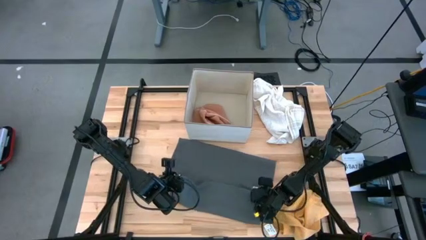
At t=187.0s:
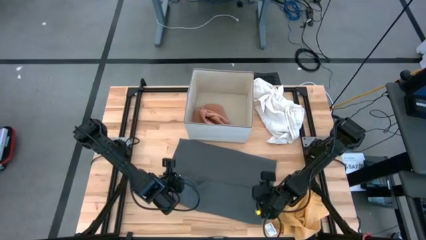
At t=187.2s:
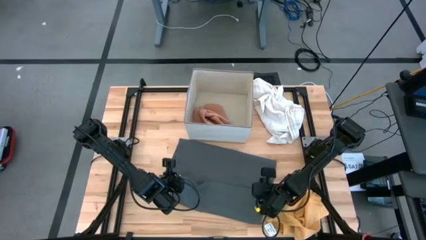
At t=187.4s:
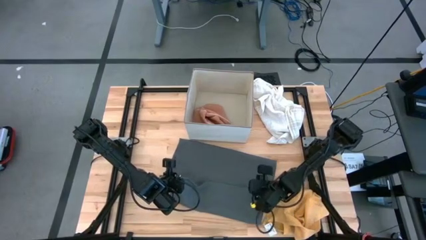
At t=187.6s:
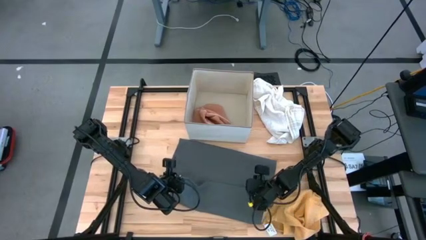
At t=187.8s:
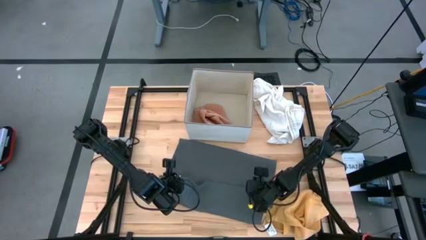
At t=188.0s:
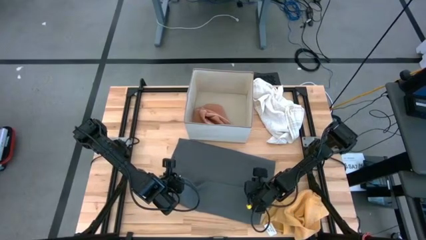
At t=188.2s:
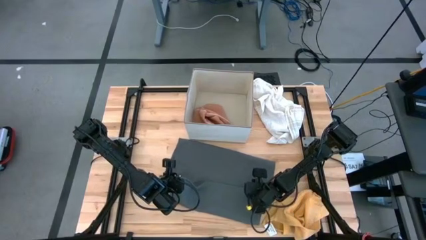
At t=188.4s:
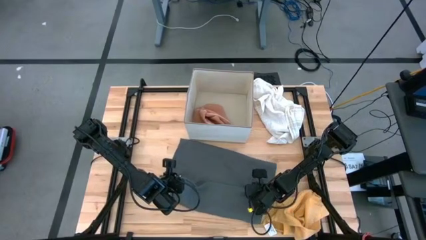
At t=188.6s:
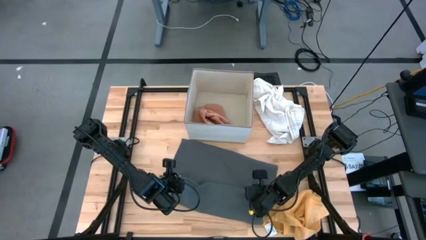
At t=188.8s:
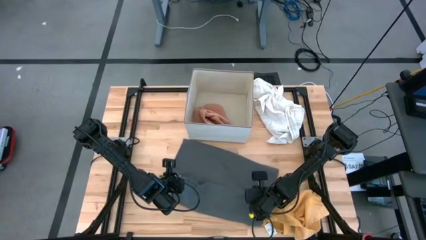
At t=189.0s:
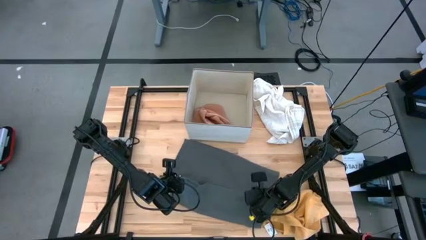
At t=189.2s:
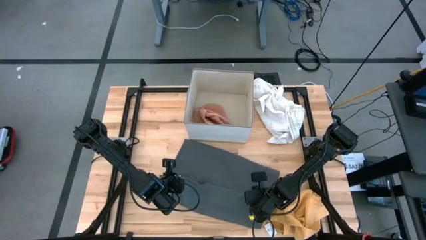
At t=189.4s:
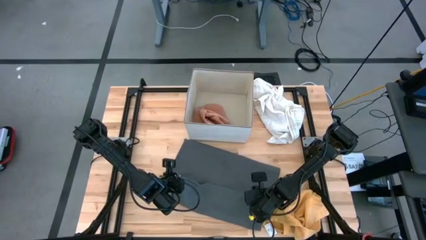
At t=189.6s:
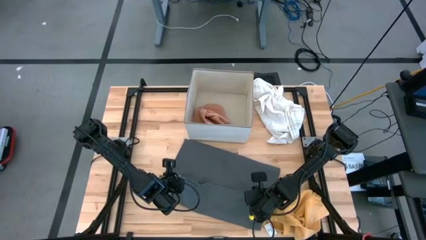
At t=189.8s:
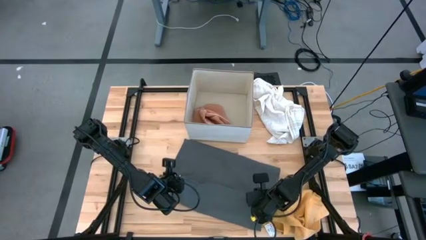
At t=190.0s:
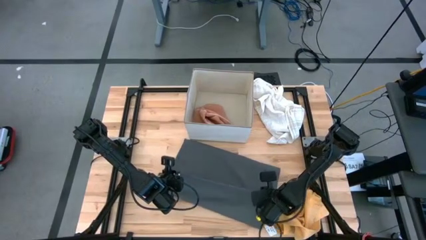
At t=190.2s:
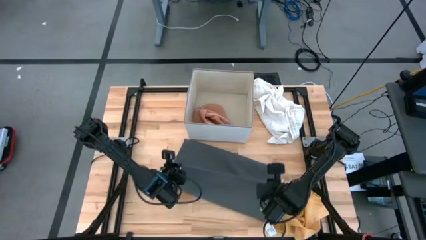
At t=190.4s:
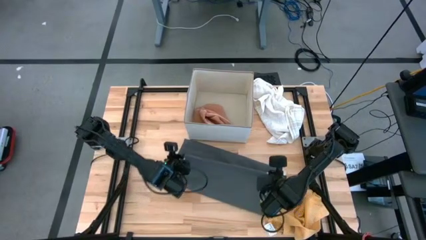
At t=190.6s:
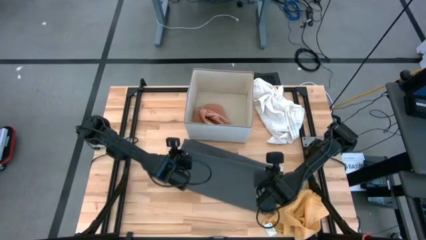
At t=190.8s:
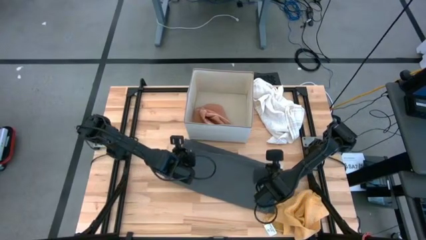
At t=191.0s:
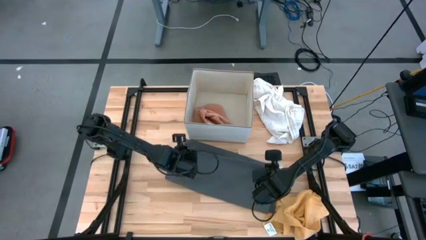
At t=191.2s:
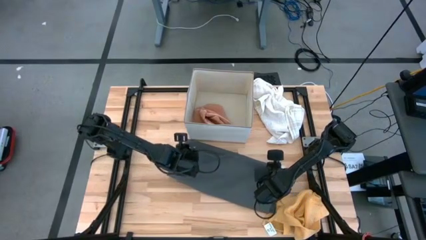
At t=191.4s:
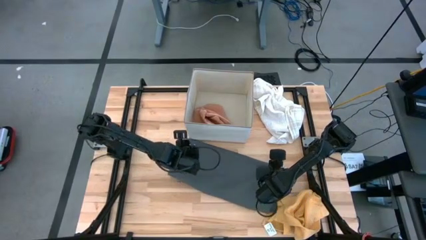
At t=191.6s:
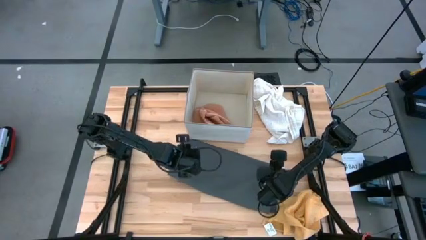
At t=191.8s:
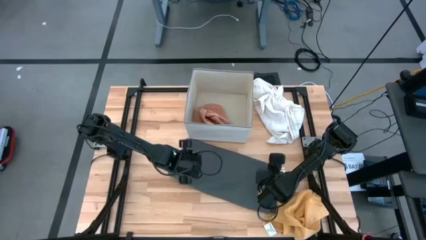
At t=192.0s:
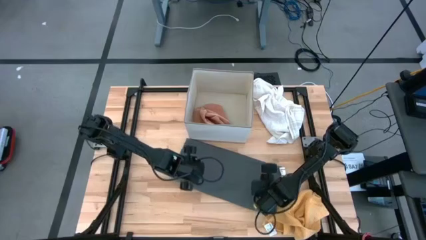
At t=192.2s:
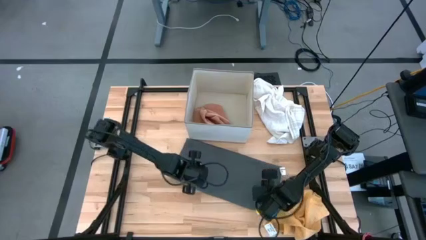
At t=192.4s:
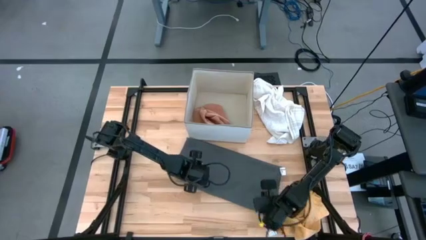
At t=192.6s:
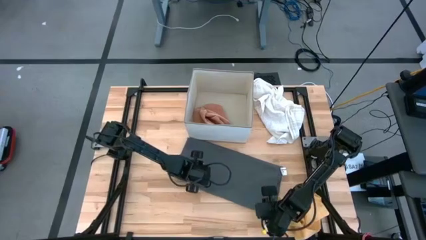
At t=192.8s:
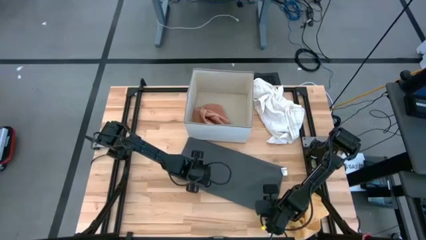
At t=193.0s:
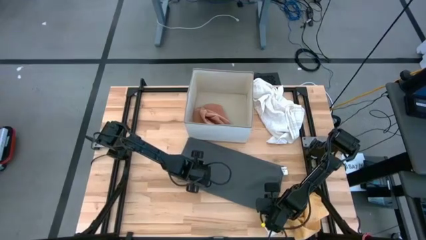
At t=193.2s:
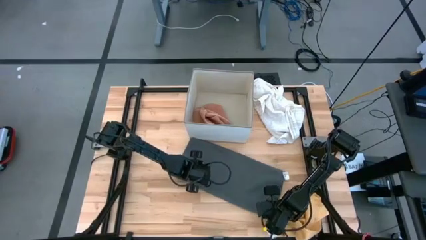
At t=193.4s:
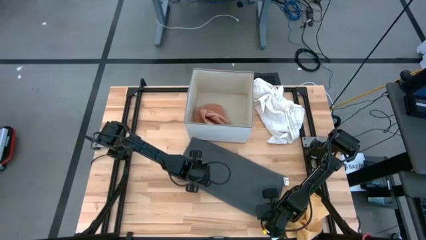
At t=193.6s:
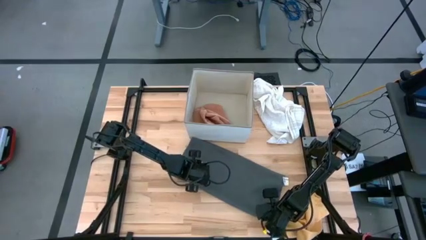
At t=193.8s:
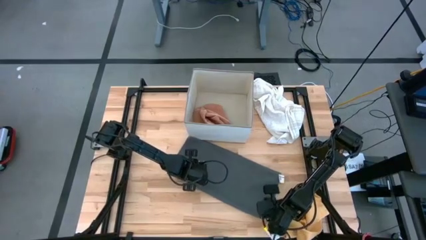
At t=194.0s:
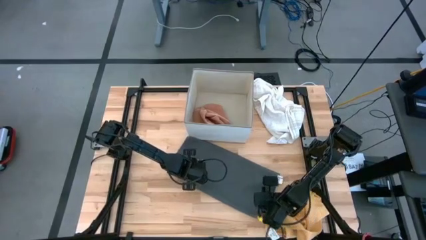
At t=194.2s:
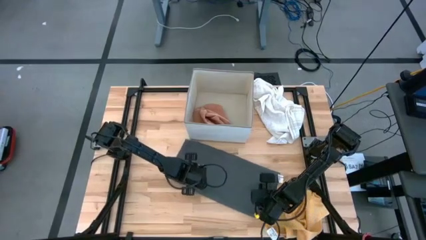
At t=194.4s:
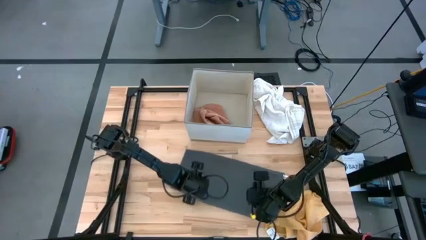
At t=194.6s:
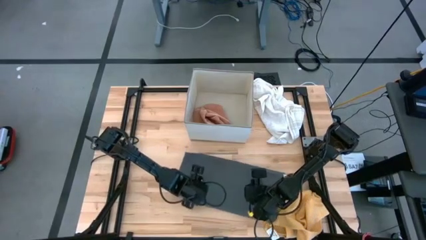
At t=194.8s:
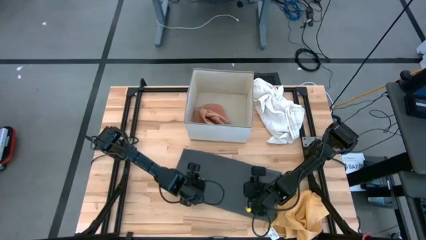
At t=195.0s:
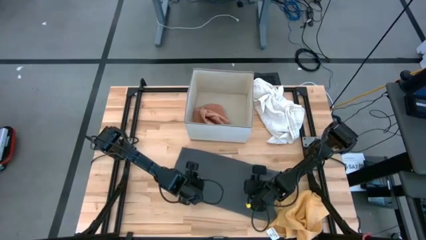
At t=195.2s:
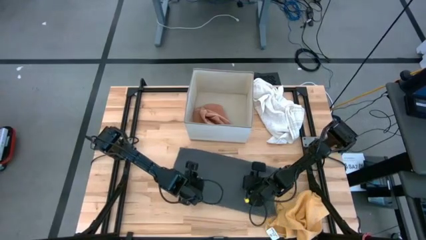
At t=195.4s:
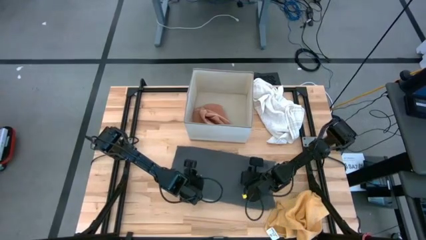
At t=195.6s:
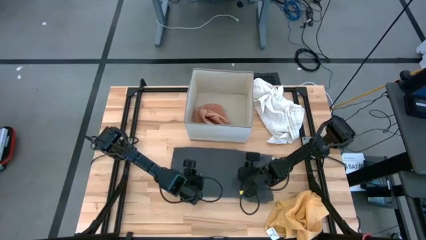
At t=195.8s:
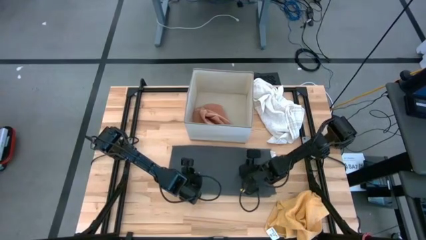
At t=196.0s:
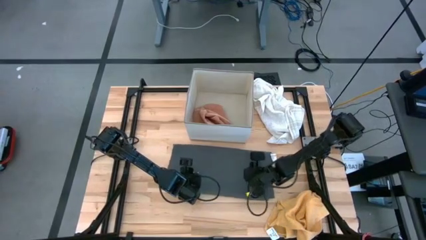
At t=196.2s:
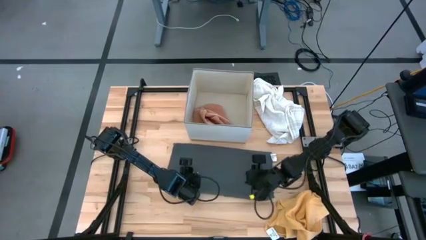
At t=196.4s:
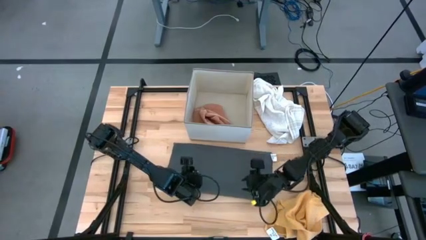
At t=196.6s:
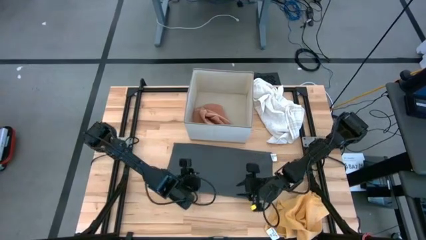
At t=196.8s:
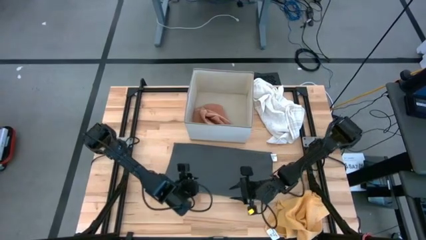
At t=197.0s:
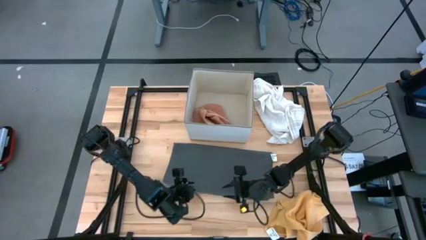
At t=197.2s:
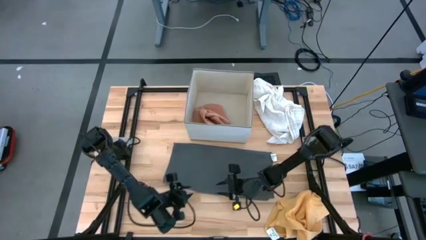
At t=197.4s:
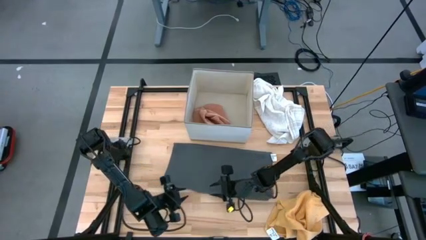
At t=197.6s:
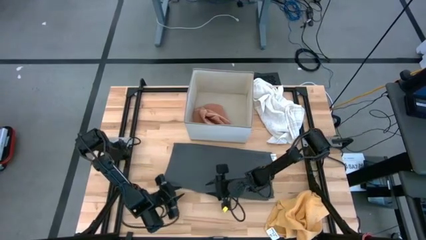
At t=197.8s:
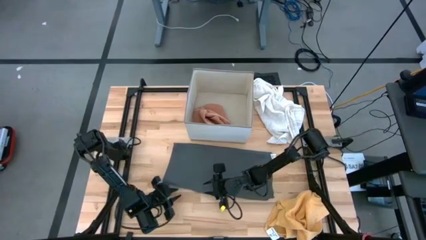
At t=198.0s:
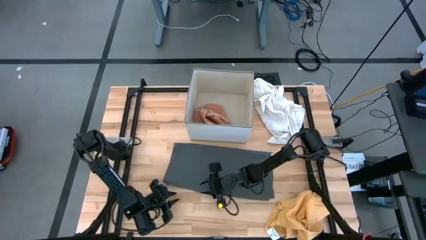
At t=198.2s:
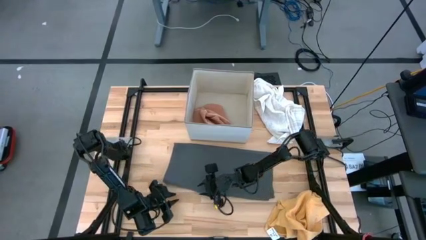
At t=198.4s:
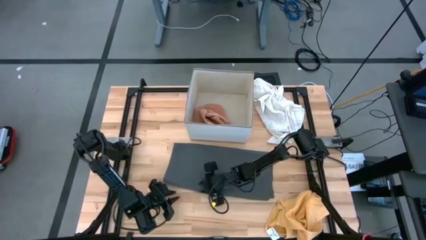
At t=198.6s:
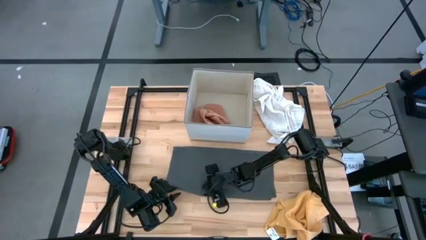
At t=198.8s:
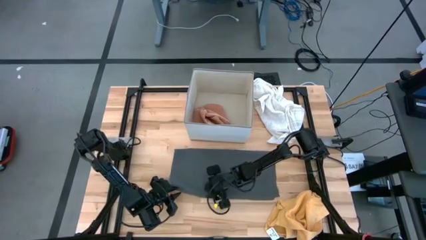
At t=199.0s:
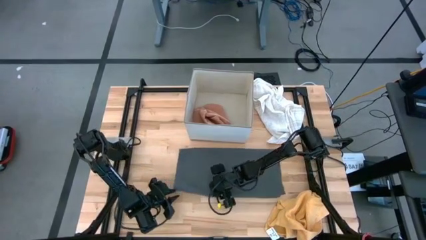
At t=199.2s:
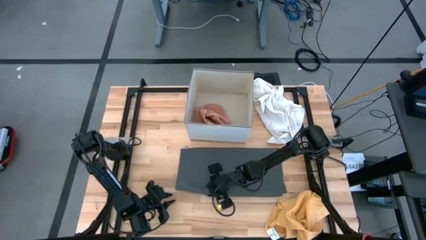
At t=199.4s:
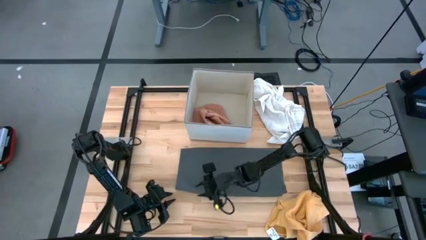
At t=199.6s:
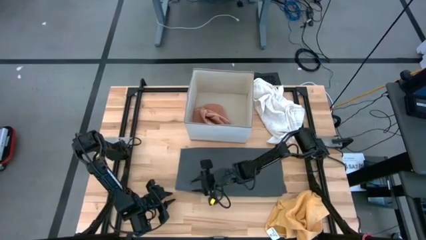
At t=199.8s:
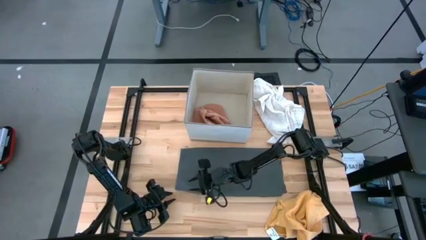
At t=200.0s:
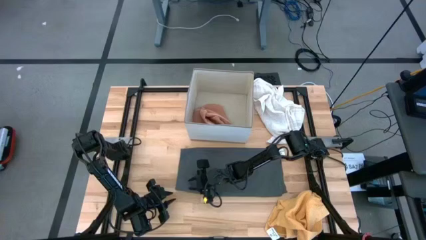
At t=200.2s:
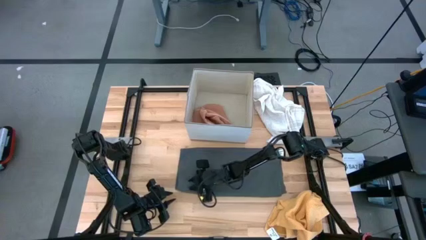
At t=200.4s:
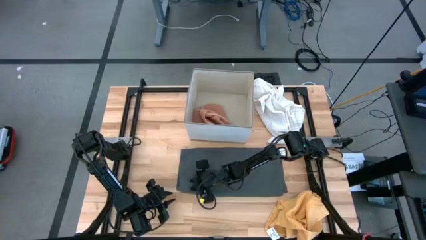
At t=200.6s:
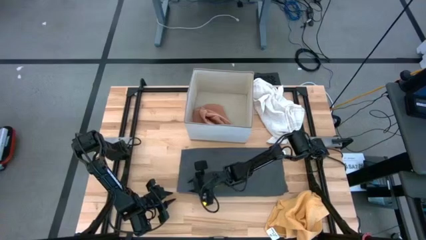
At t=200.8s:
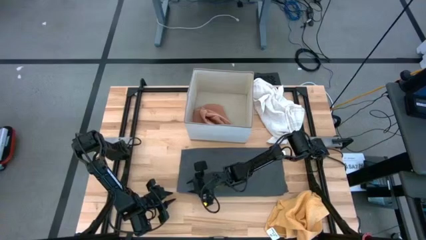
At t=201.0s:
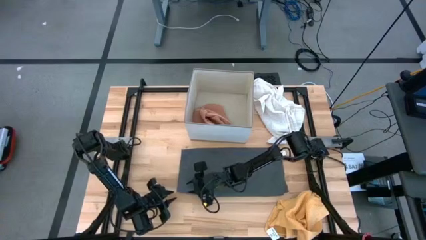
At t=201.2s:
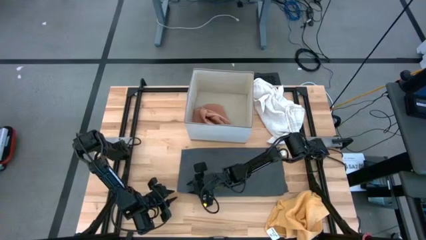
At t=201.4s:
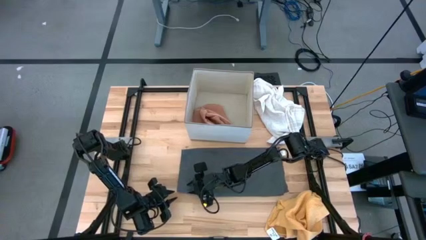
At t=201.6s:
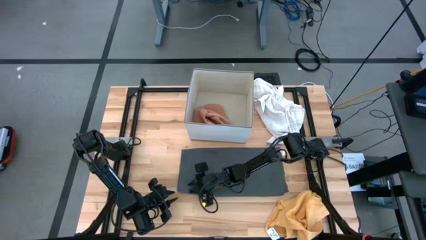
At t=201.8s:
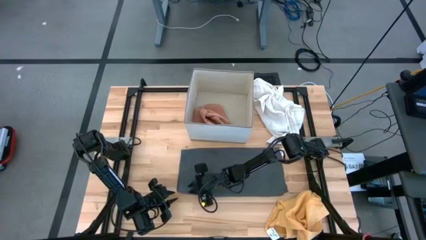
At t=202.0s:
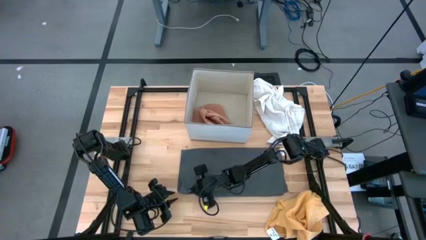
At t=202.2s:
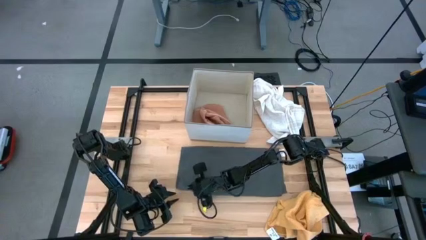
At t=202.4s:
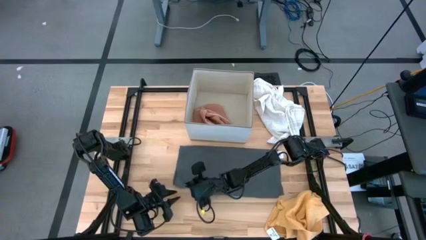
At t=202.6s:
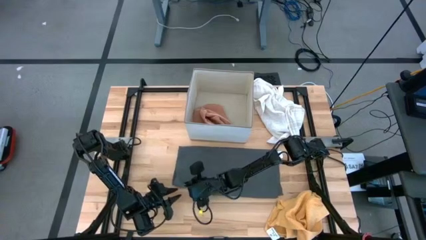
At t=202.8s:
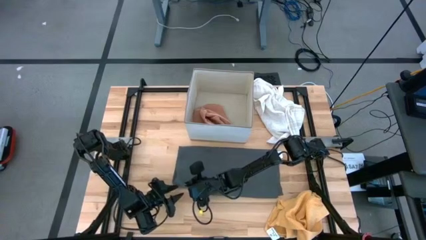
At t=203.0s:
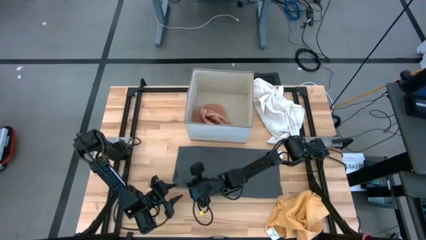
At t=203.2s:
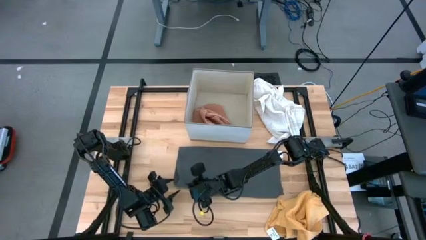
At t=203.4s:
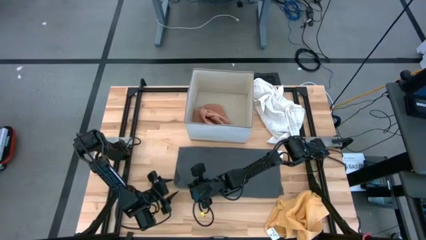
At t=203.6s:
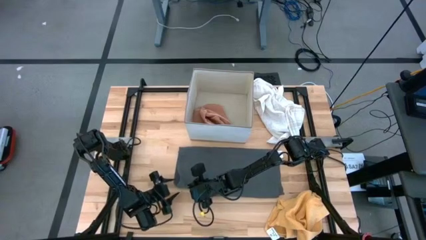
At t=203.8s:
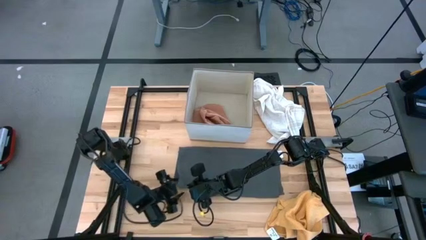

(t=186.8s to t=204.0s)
Task: Fold towel
Fold the gray towel
